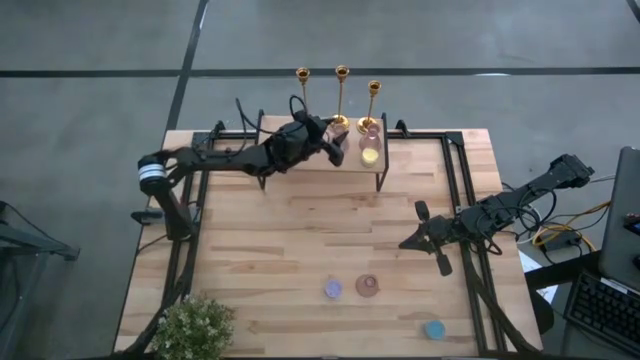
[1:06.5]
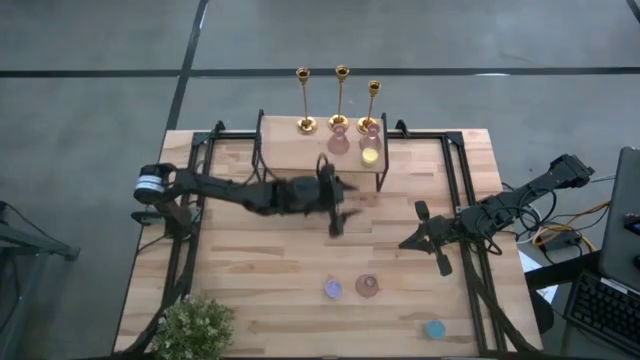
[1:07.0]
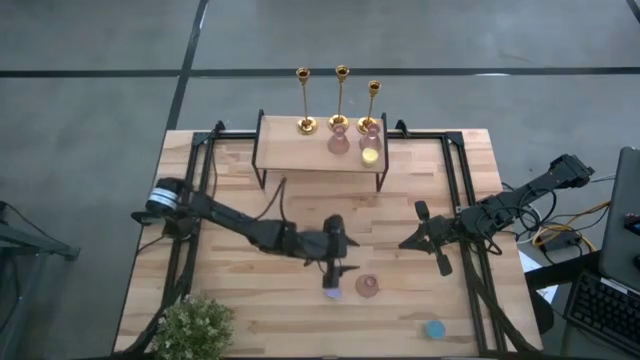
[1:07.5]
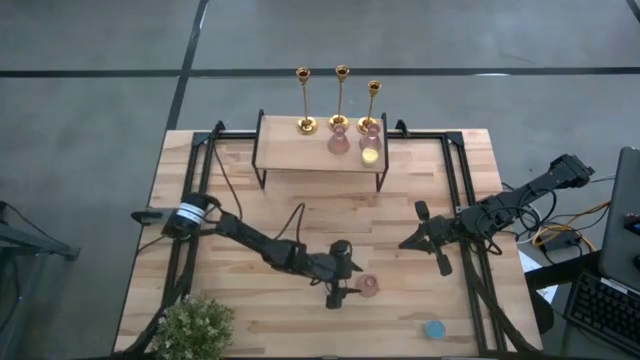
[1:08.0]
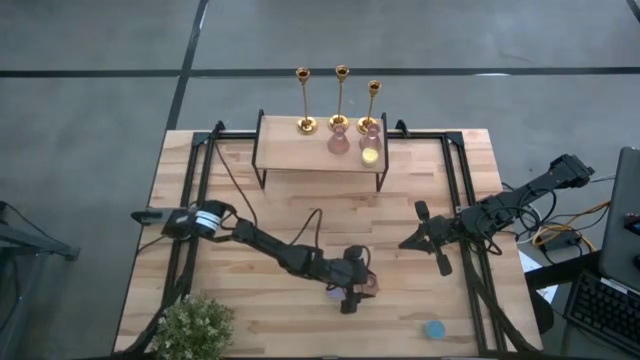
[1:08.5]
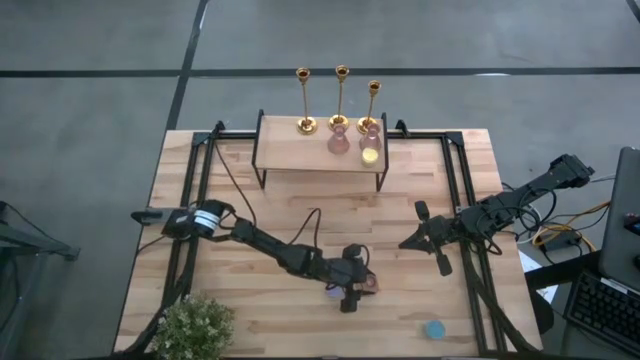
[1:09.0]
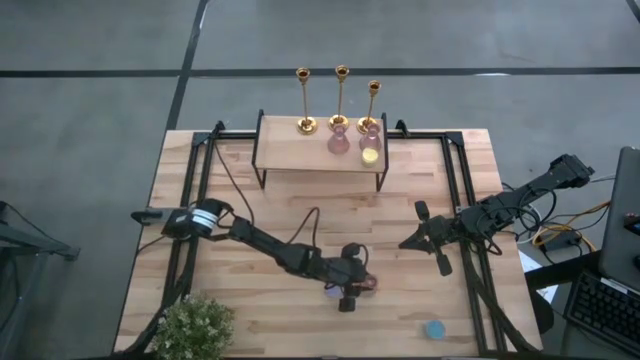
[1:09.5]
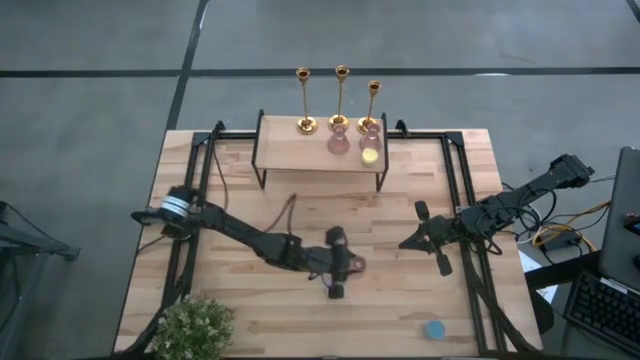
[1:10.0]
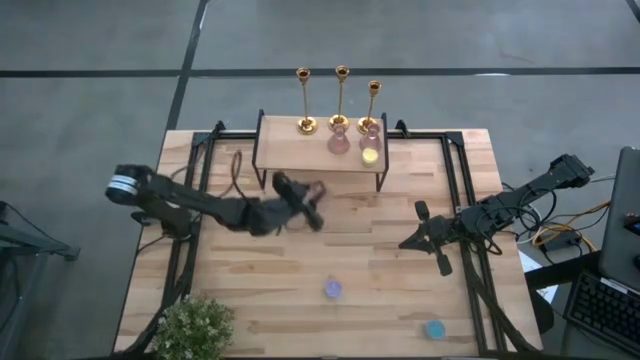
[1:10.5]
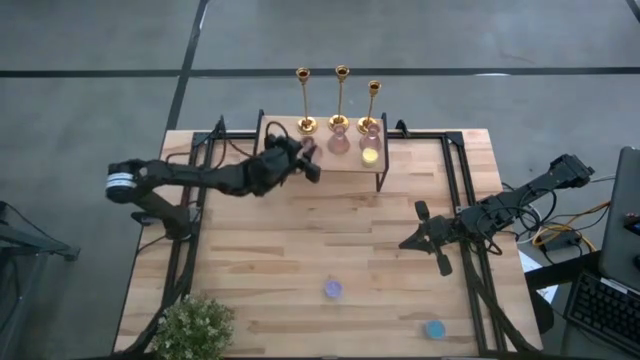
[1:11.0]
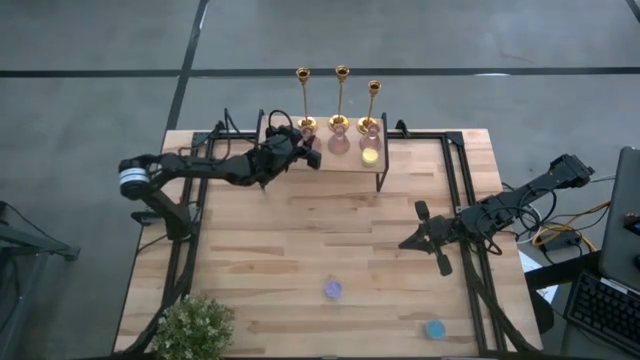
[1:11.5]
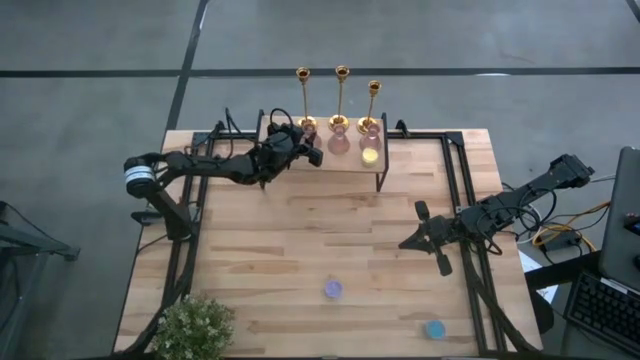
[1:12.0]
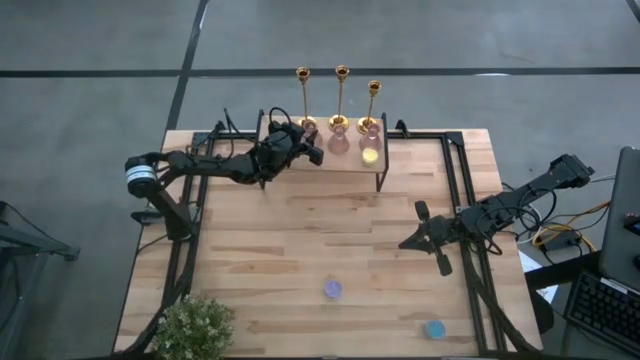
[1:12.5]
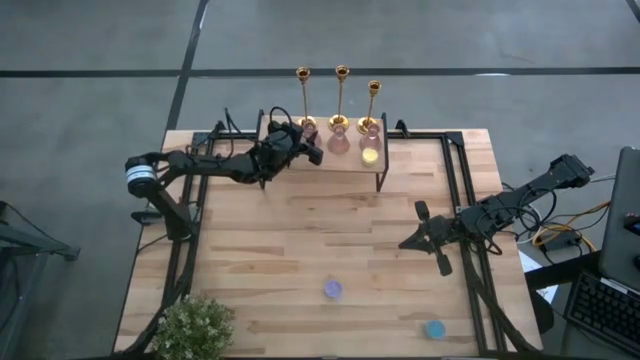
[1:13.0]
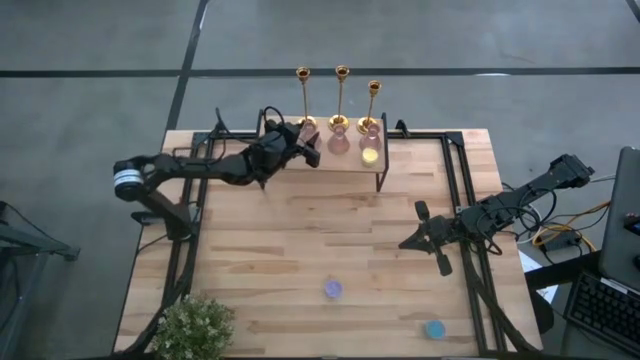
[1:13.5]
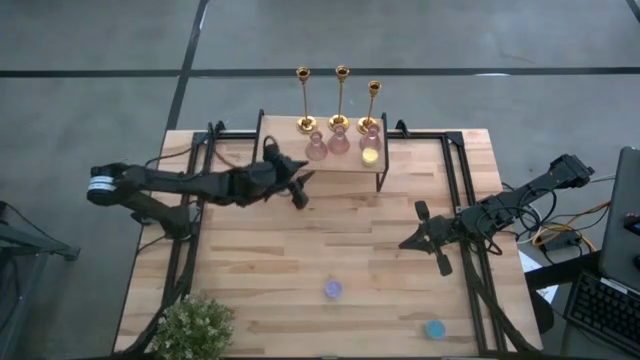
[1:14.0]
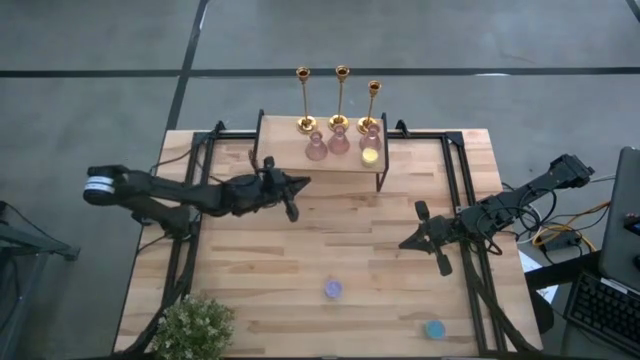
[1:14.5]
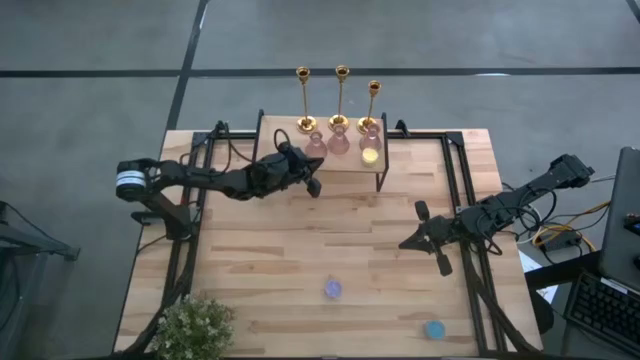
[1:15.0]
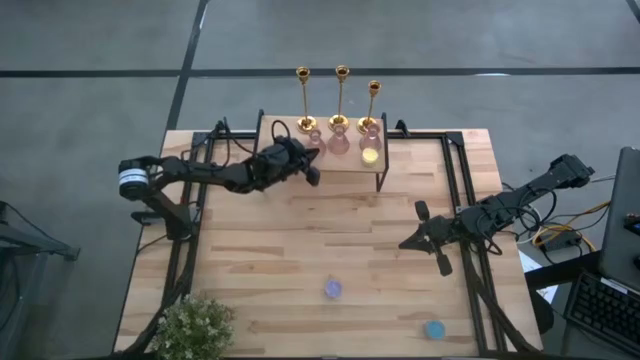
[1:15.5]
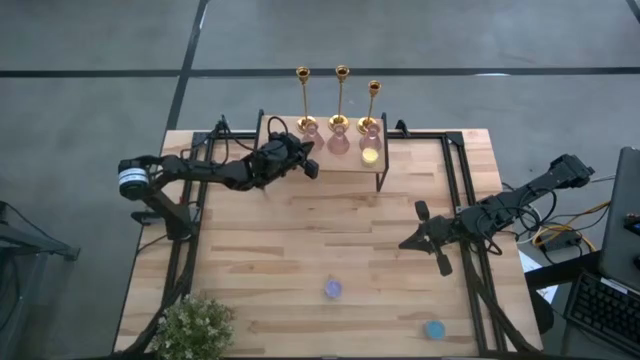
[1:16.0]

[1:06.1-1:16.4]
Task: Pick & Place candle stick holders
Put the purple candle holder on the shelf aligned with the other purple candle holders

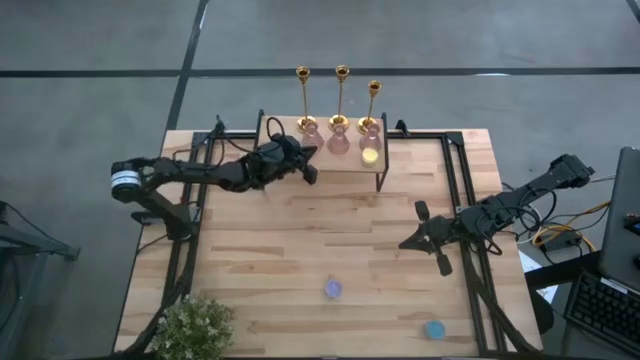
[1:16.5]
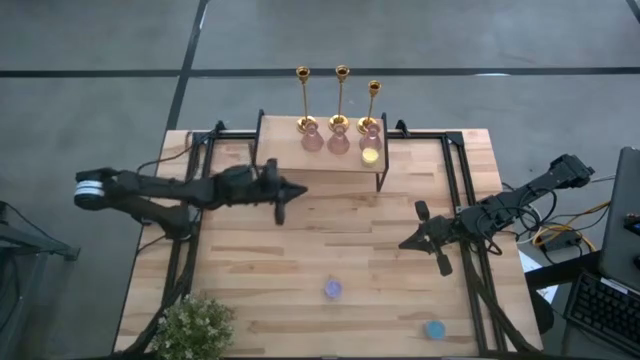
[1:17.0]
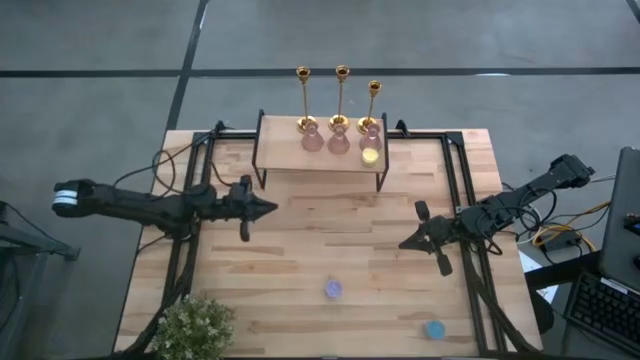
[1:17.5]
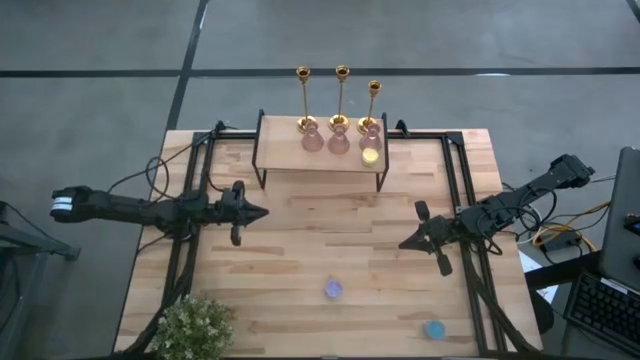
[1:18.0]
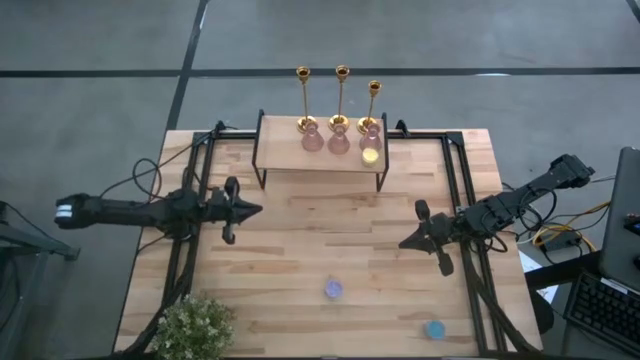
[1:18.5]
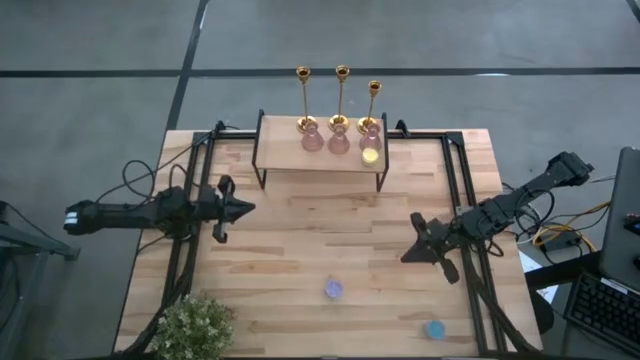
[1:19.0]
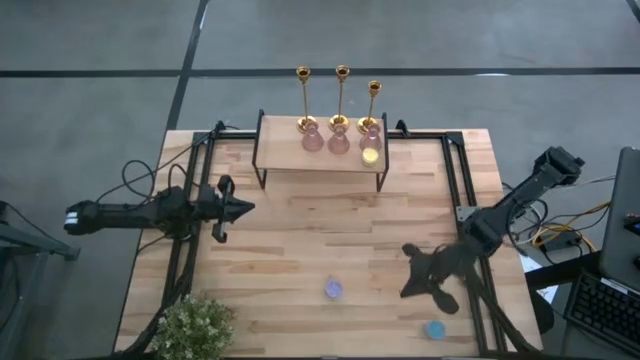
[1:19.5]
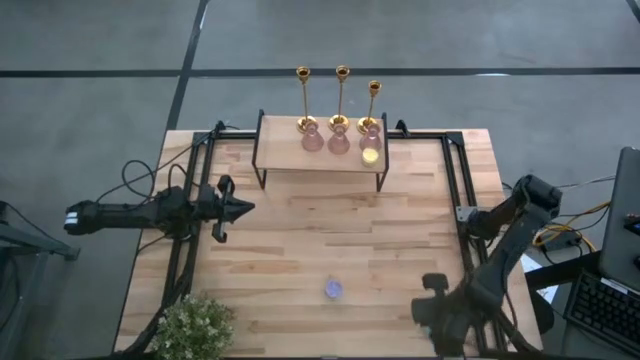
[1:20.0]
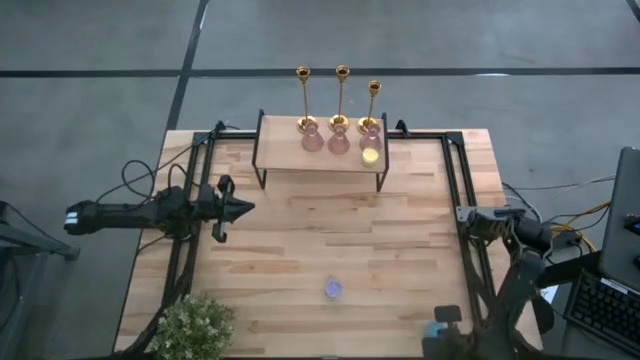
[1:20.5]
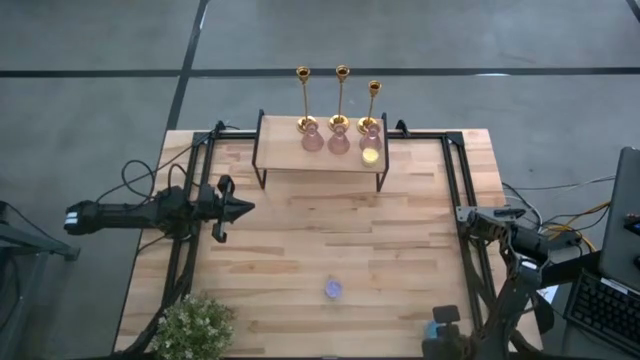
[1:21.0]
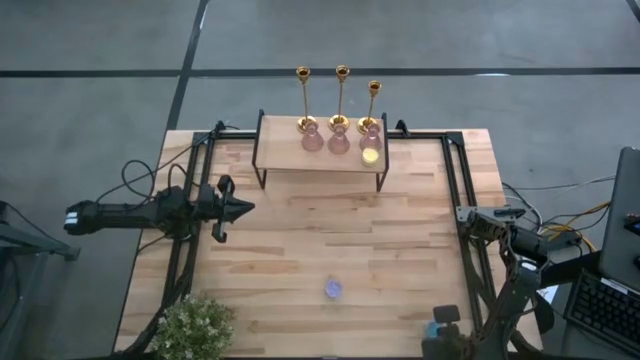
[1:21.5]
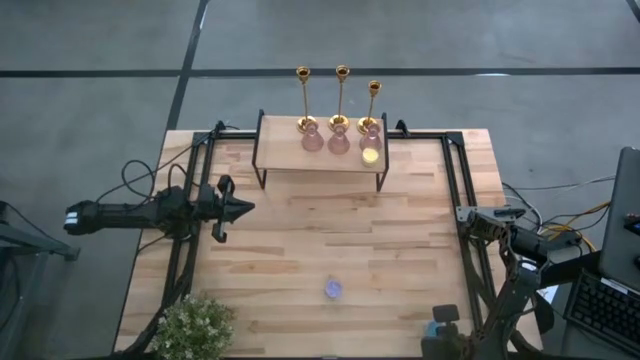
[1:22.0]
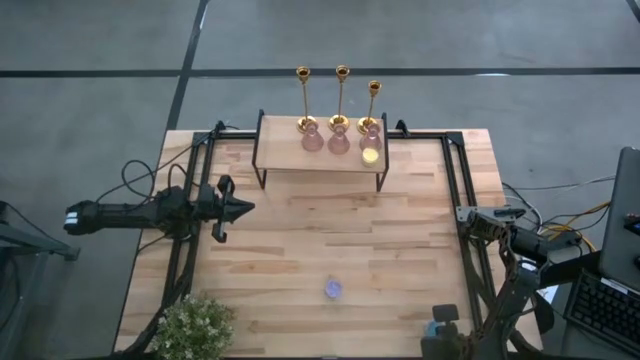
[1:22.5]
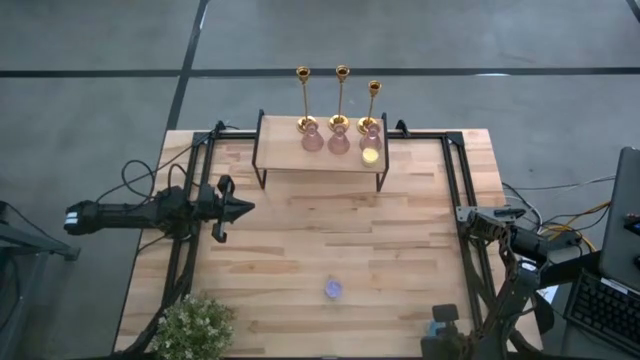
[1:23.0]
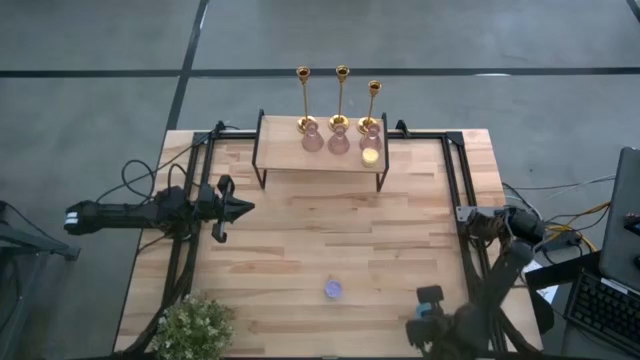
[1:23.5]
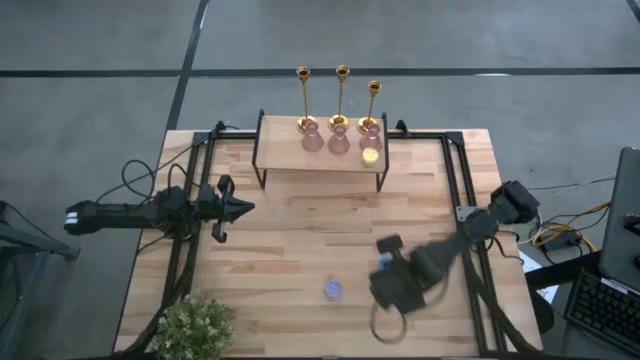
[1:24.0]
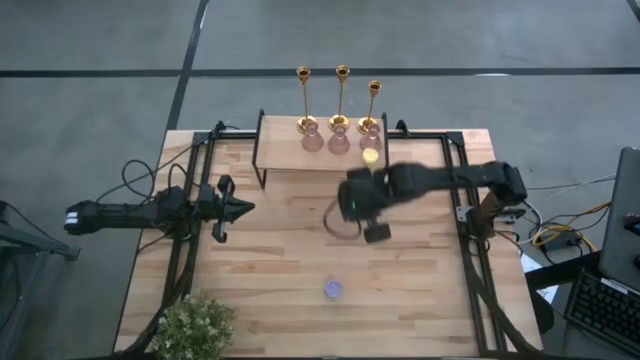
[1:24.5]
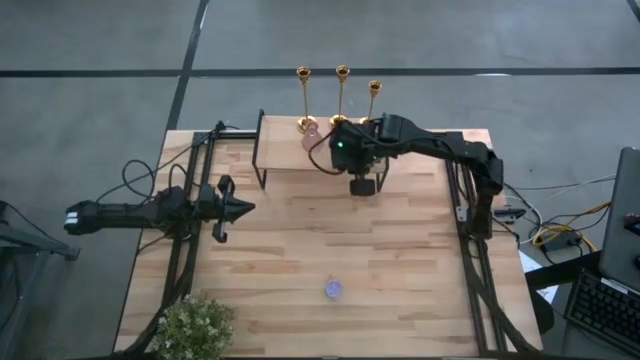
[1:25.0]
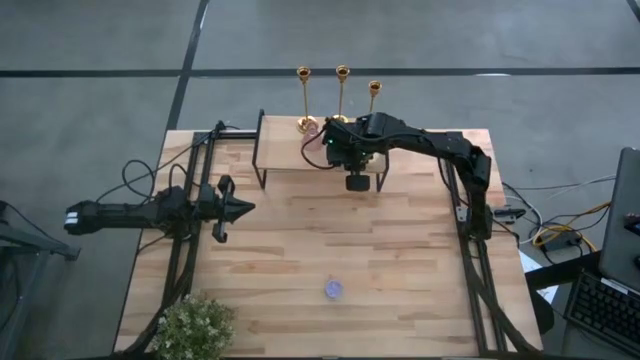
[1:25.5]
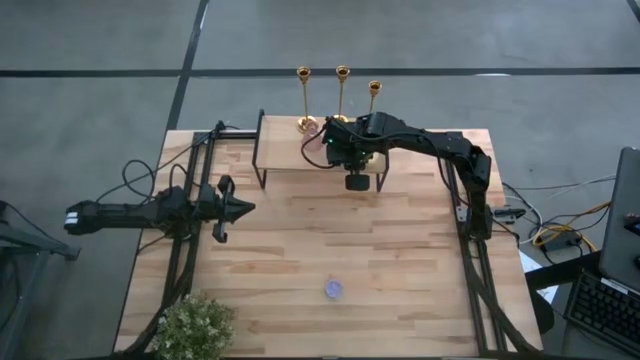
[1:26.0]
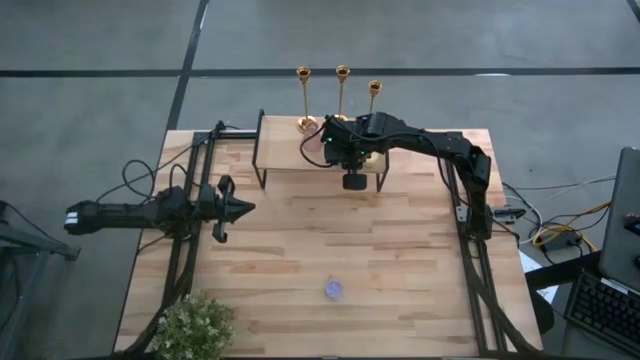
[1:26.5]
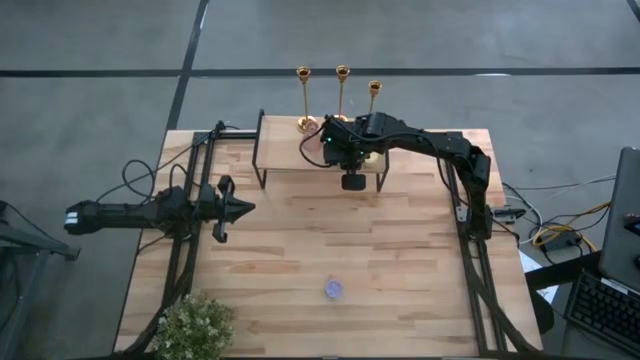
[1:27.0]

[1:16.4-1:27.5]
Put the blue scented candle on the shelf aligned with the other yellow scented candle
